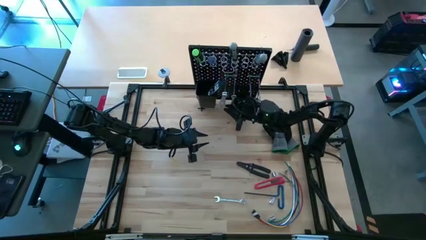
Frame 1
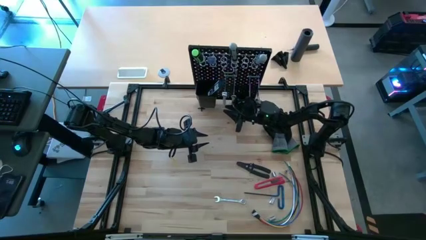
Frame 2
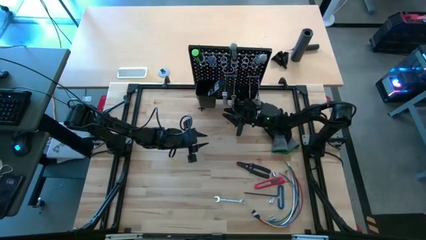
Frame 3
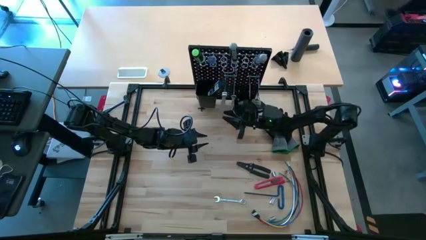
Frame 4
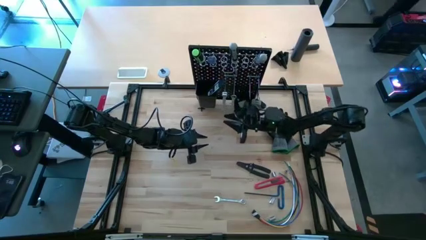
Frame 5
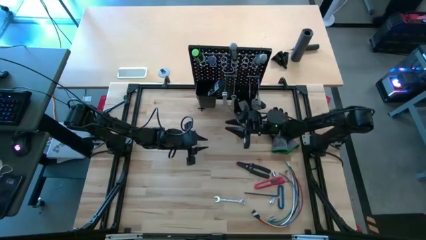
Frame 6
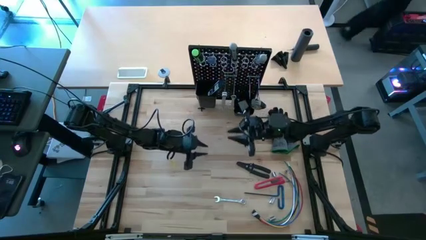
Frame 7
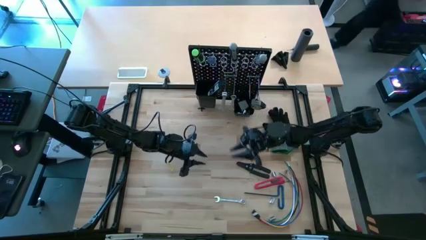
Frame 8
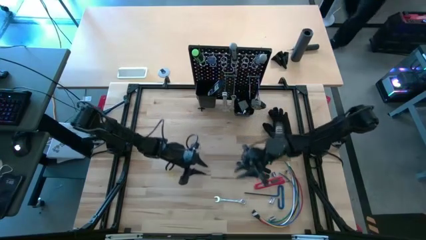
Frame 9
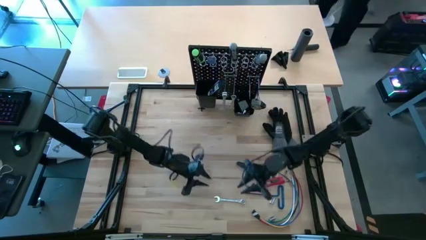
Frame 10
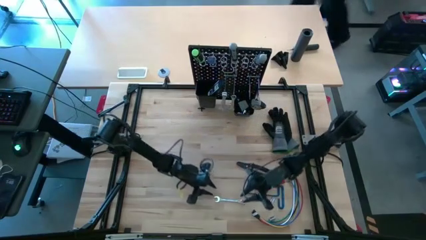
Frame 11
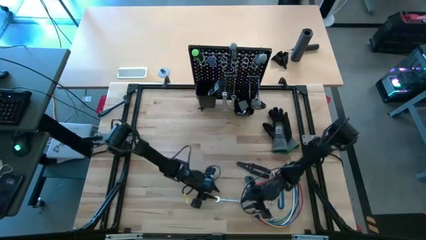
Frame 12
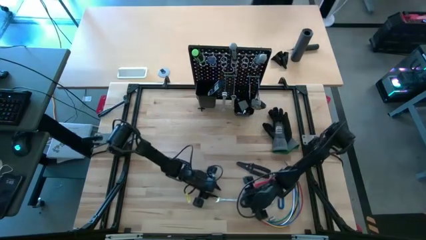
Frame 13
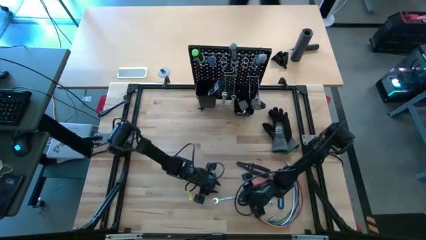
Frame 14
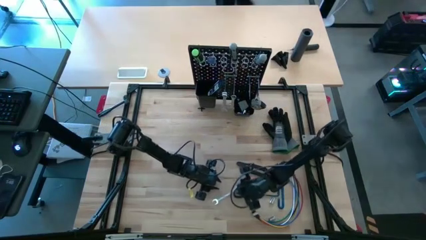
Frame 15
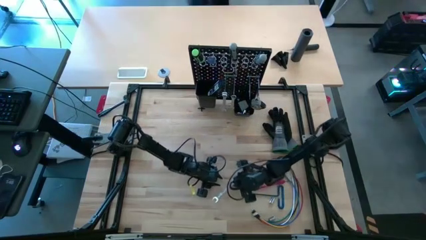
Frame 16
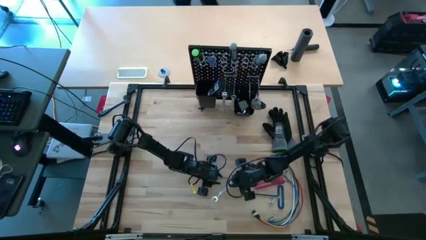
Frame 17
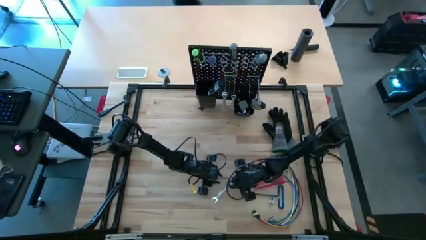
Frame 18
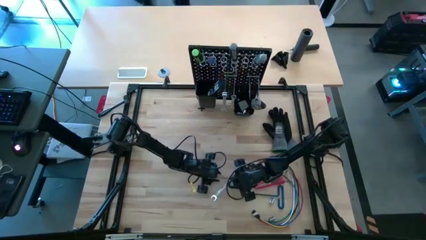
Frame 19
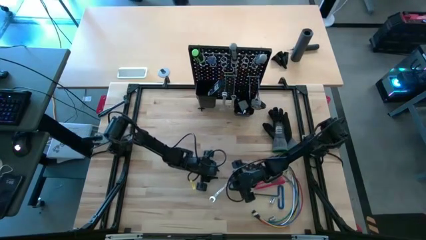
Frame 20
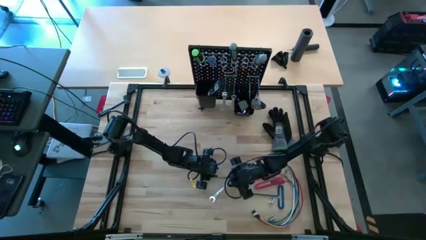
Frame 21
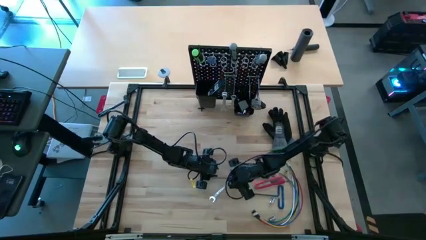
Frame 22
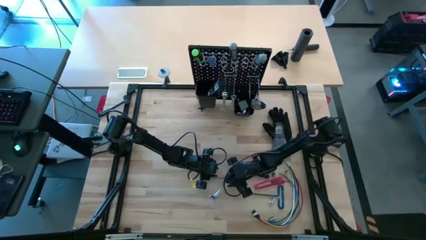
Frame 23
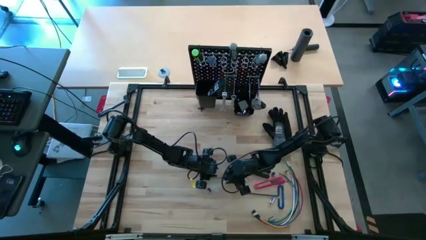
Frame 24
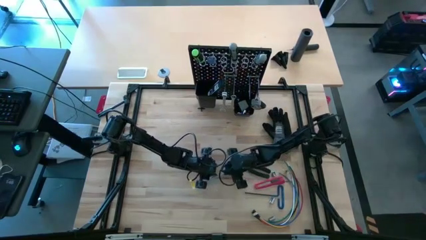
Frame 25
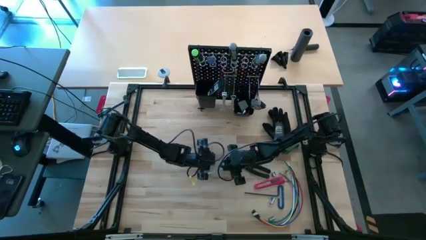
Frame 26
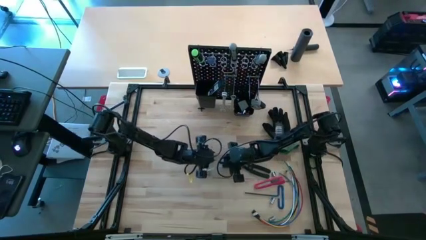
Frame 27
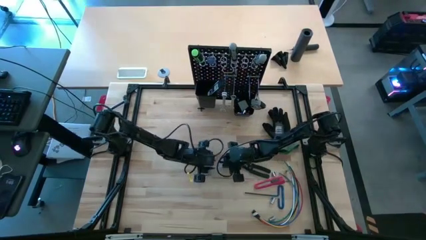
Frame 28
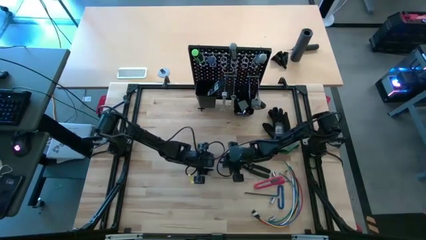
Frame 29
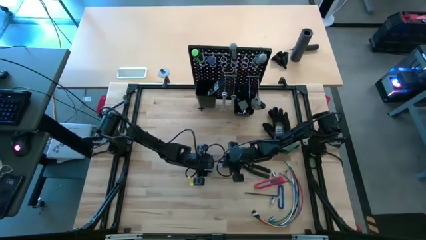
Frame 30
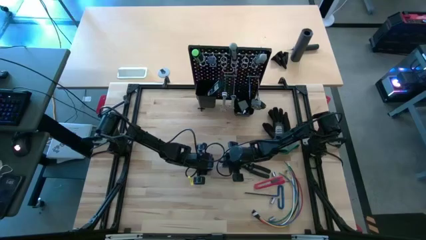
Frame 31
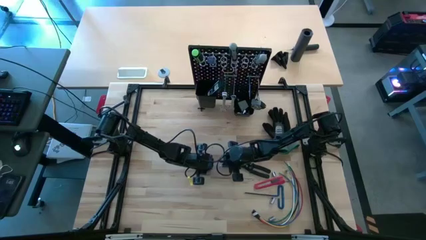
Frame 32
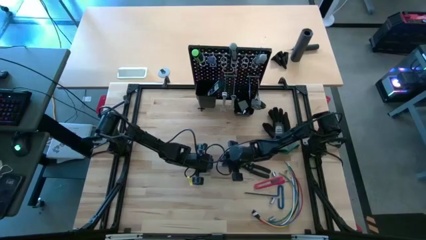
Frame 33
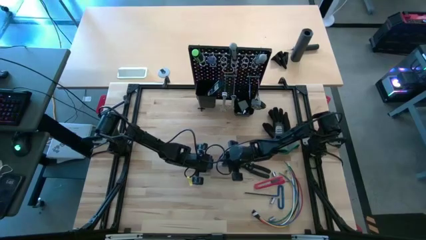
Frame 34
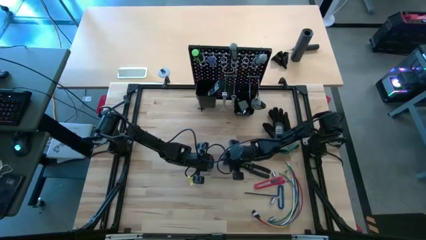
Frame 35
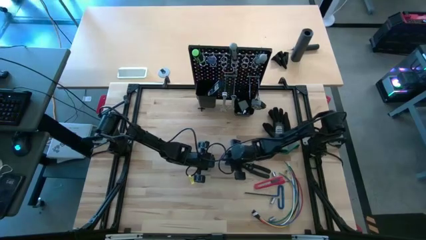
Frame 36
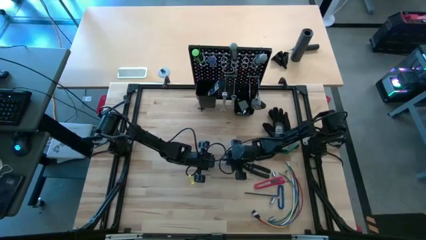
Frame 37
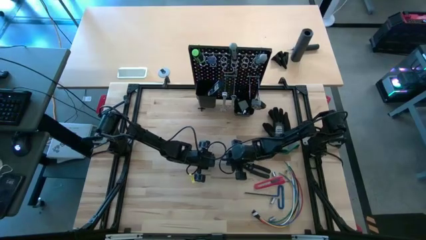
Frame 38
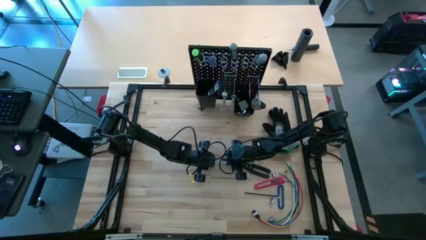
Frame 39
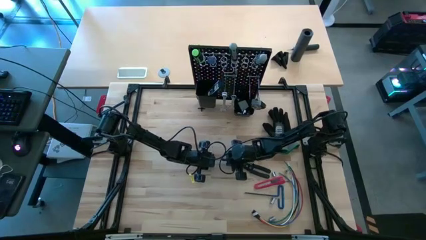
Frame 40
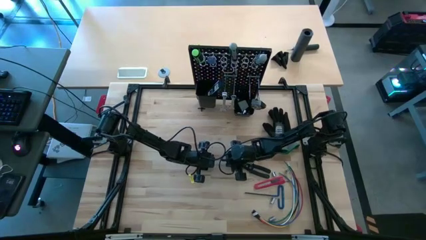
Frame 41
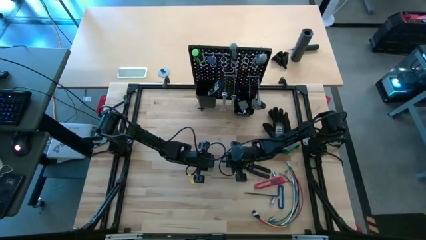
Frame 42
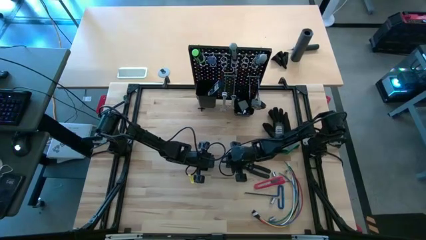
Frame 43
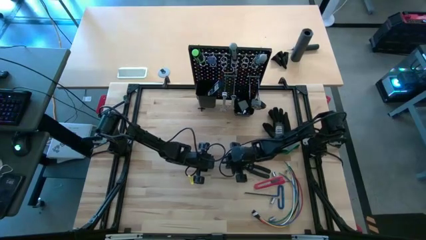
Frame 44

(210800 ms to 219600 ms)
Task: Hang tools onto peg board
Hang the silver wrench on the peg board

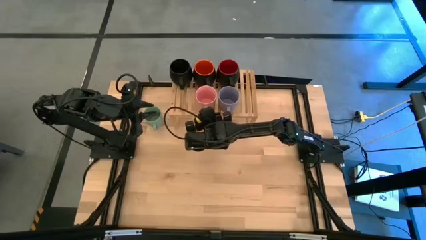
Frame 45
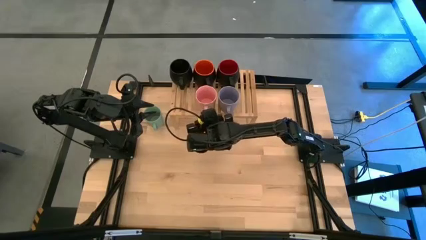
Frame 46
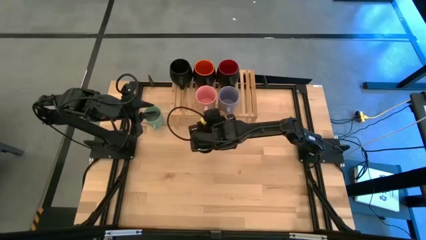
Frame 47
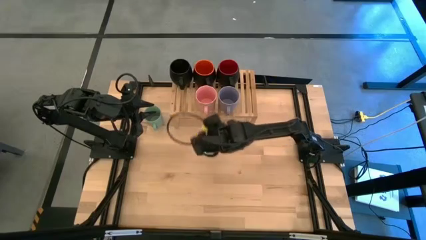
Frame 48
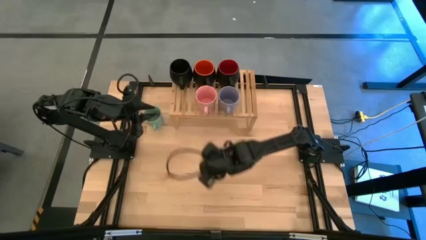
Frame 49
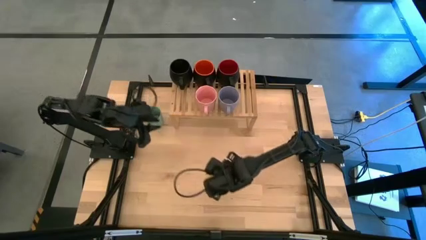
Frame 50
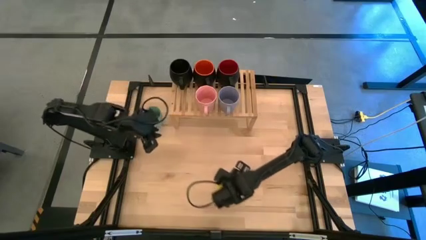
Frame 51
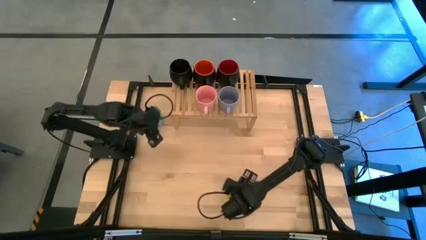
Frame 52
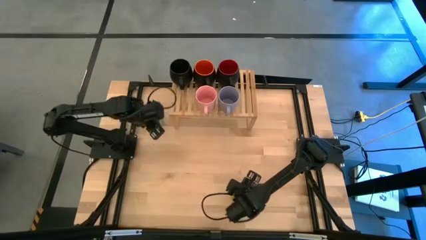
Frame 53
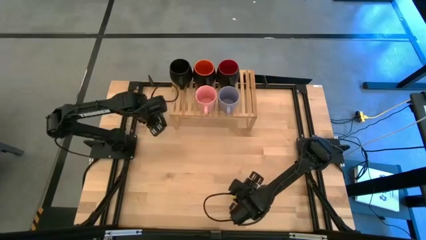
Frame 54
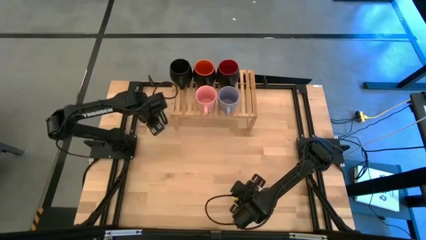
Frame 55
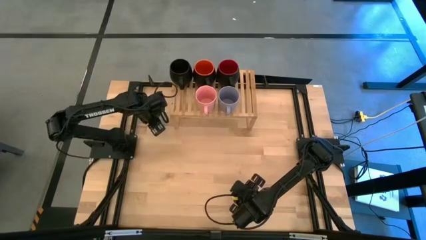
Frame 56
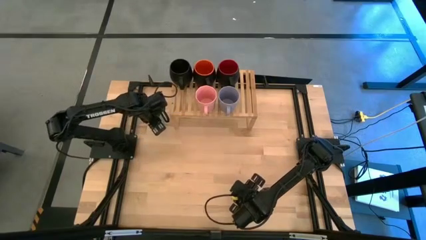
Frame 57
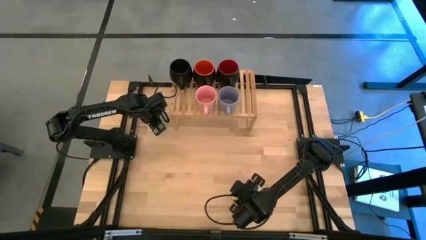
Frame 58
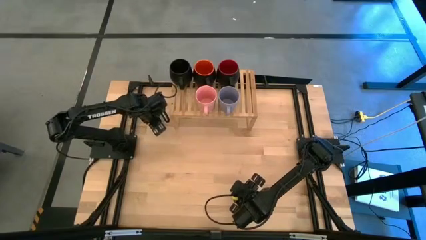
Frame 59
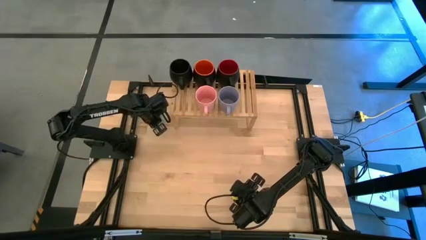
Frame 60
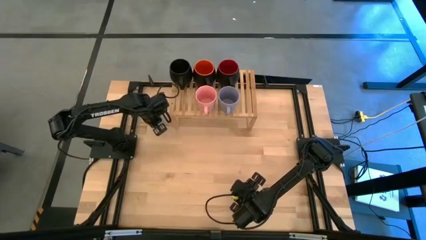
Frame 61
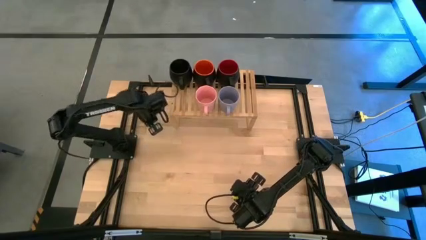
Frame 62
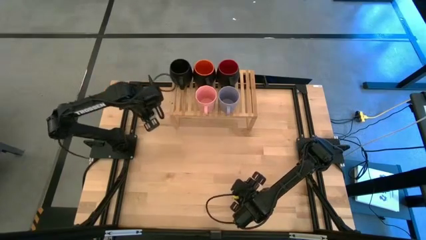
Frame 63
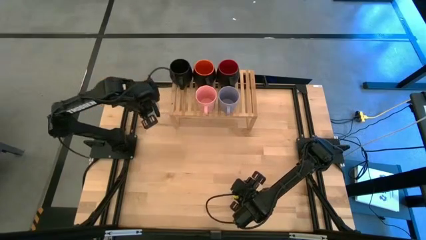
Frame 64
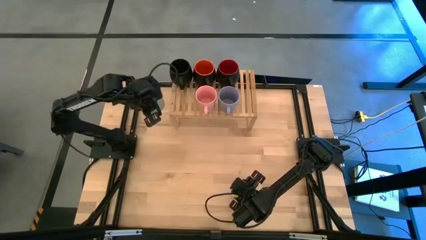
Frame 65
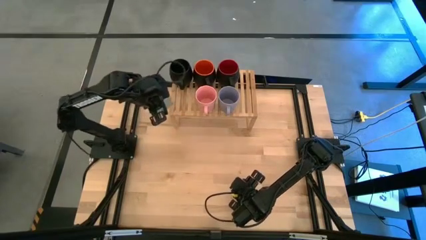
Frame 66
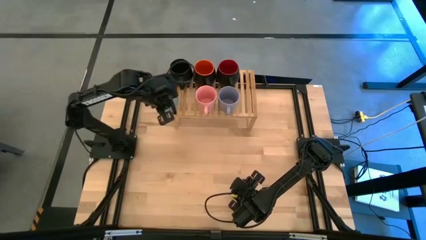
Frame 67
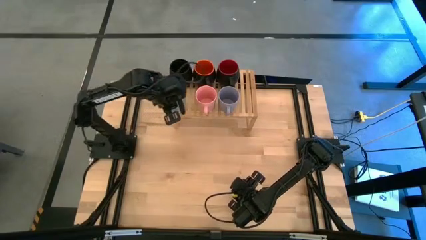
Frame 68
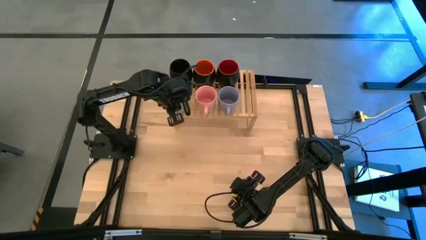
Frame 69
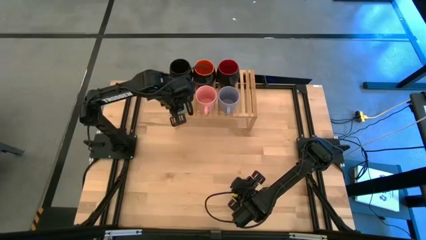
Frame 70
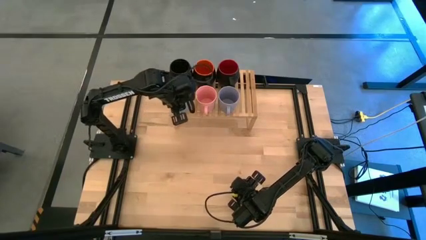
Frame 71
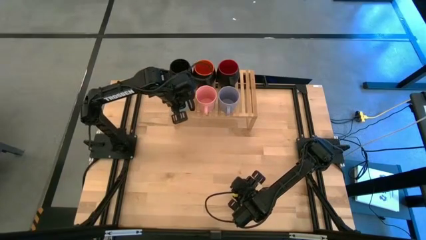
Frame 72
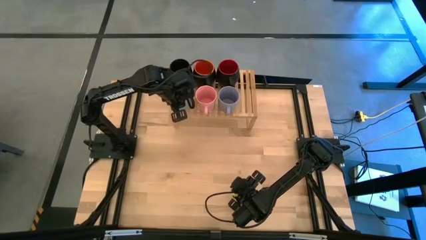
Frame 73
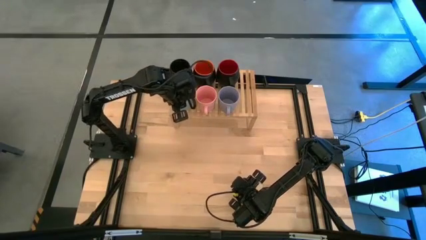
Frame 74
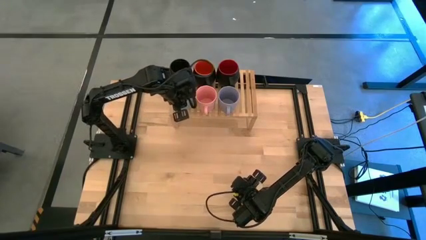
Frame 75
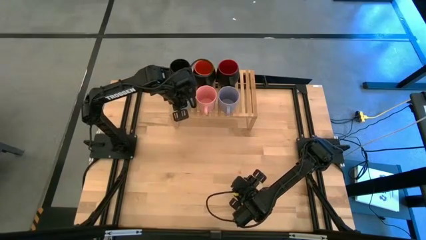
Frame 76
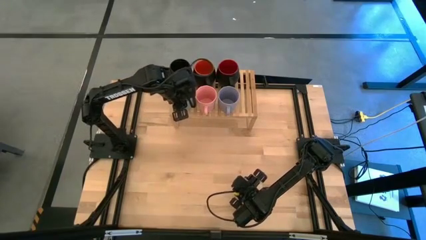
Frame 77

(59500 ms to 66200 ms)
Task: Place coffee mugs
Put the green mug on the shelf

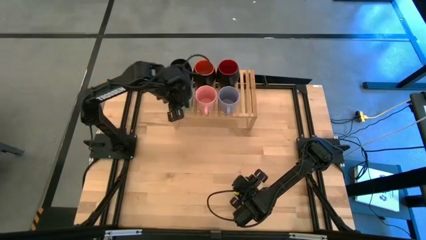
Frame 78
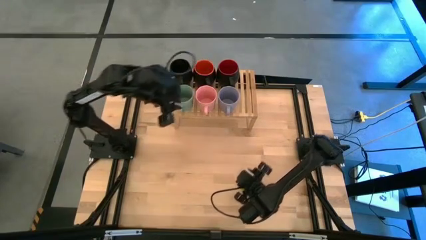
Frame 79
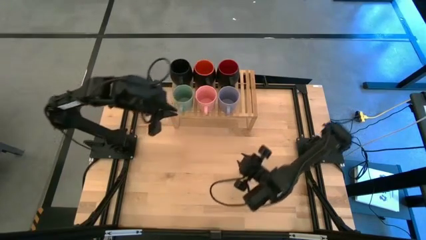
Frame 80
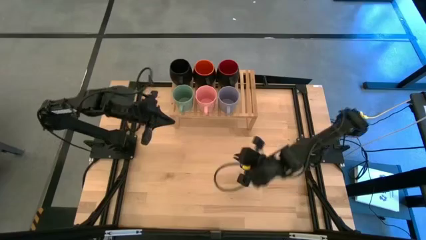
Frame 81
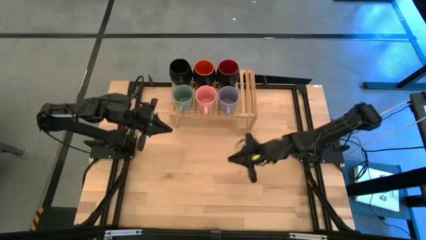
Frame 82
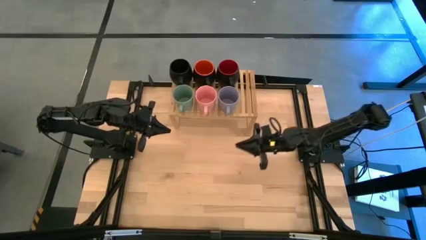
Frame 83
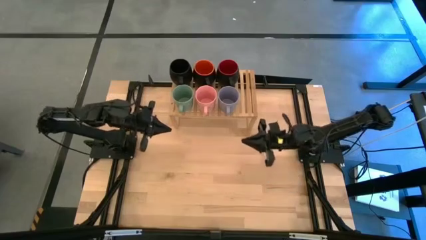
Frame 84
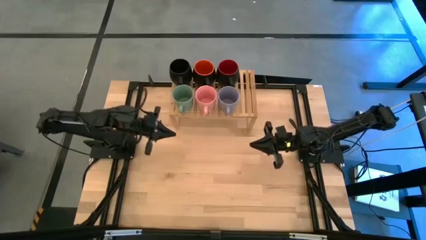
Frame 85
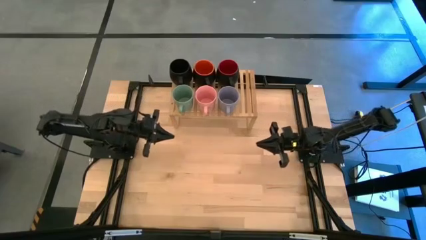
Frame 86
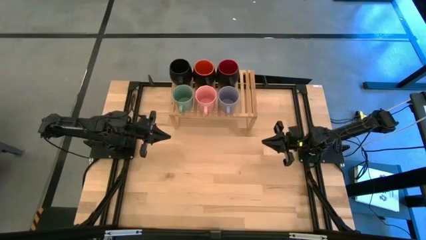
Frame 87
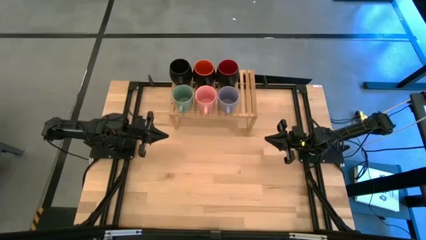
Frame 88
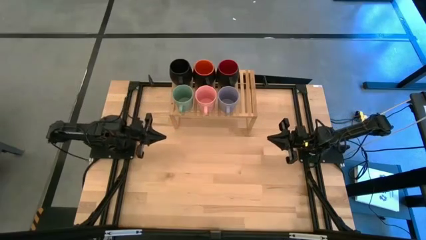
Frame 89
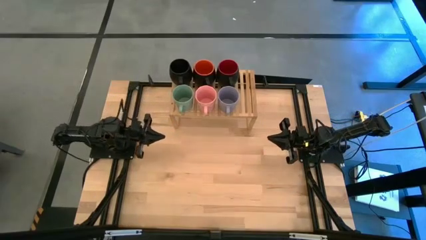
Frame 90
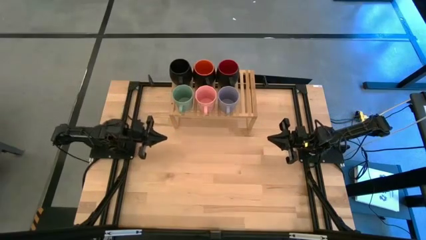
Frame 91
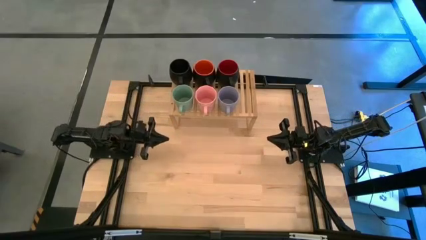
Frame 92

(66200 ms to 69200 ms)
Return to Home Position
